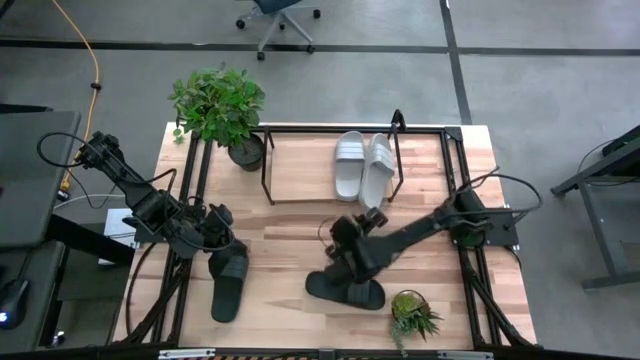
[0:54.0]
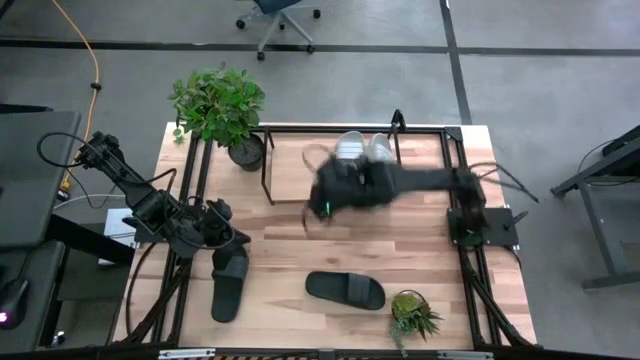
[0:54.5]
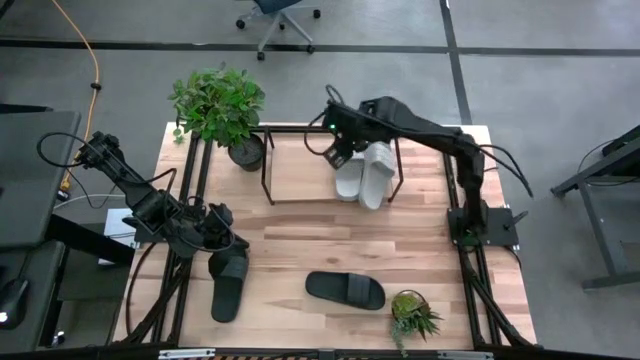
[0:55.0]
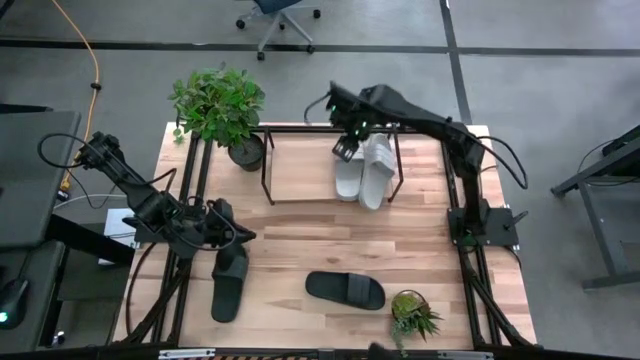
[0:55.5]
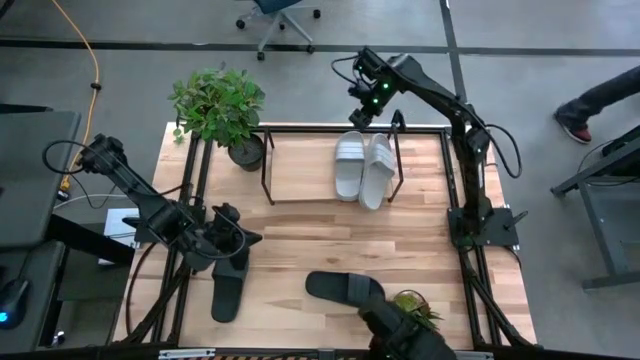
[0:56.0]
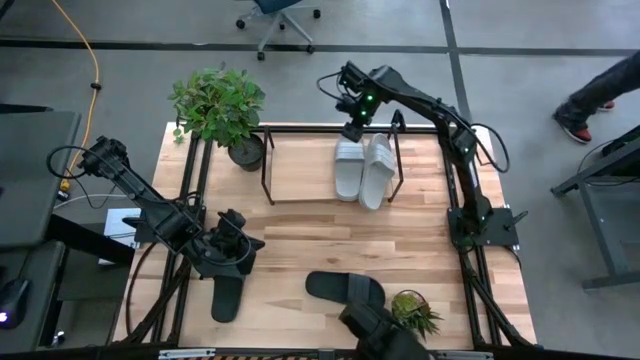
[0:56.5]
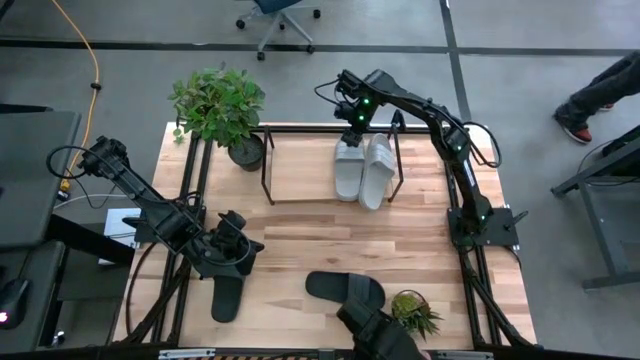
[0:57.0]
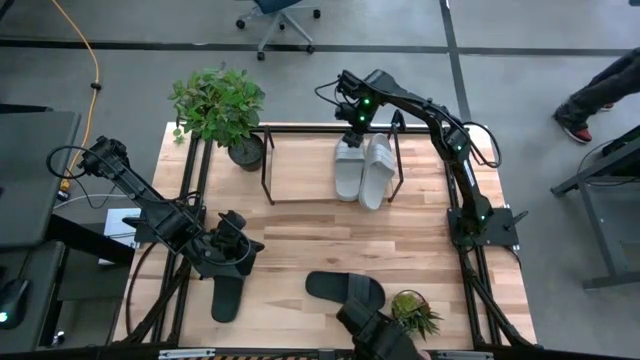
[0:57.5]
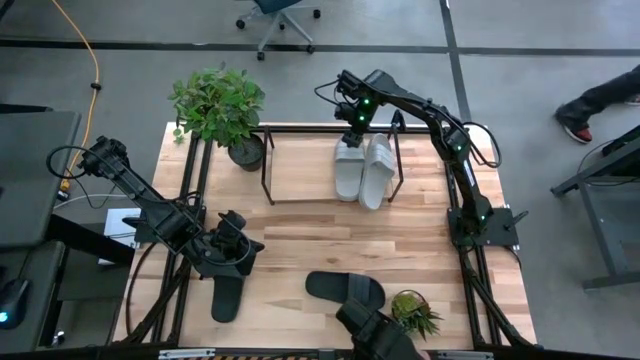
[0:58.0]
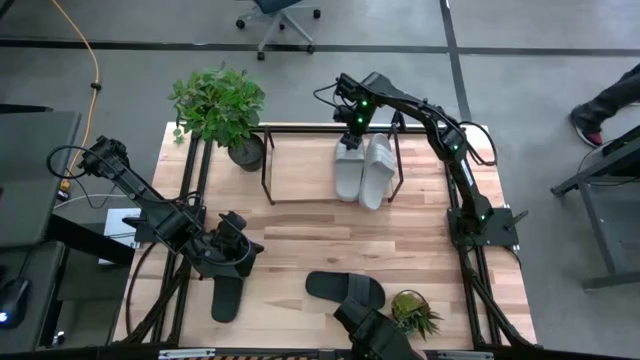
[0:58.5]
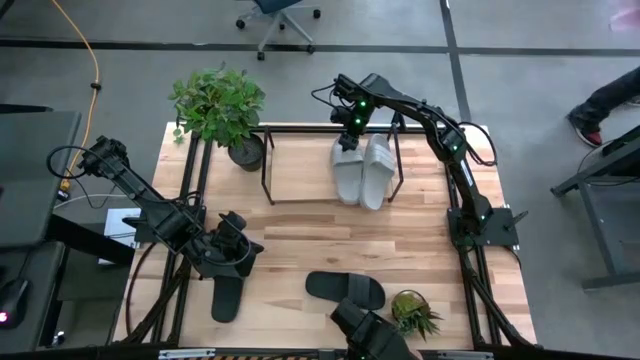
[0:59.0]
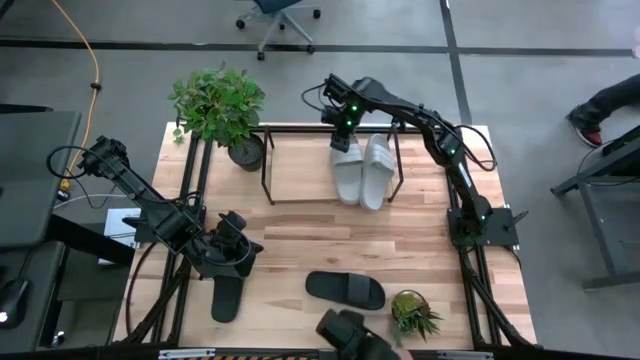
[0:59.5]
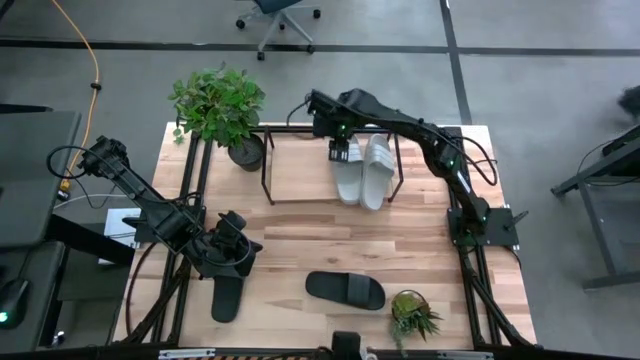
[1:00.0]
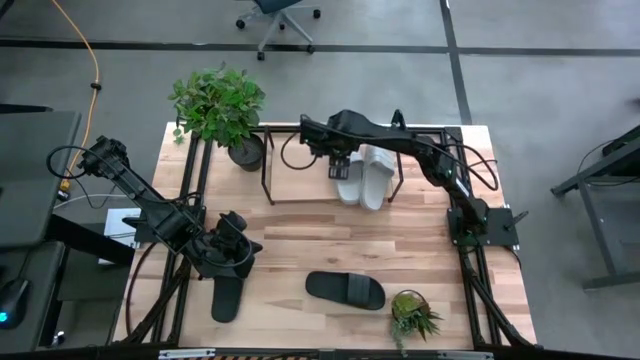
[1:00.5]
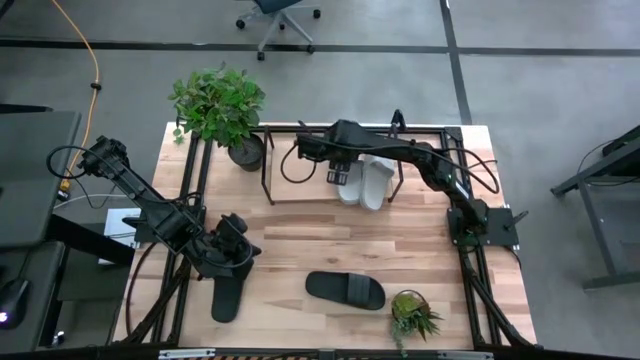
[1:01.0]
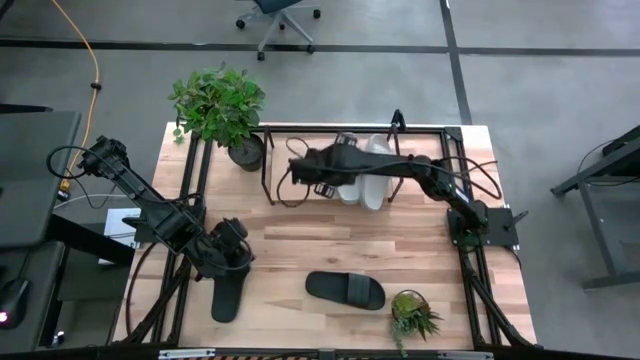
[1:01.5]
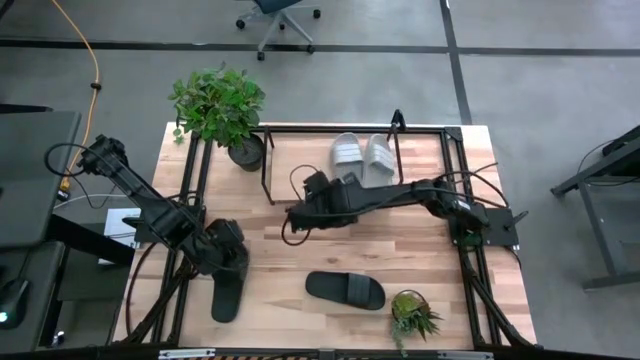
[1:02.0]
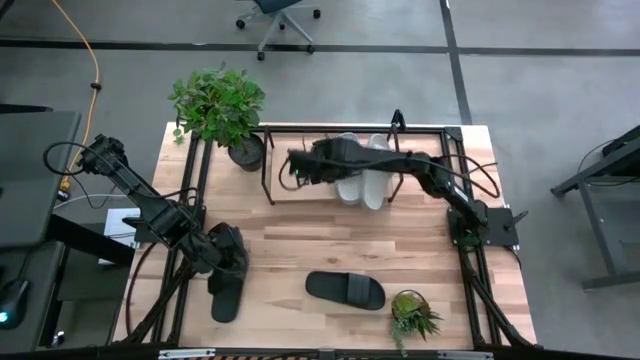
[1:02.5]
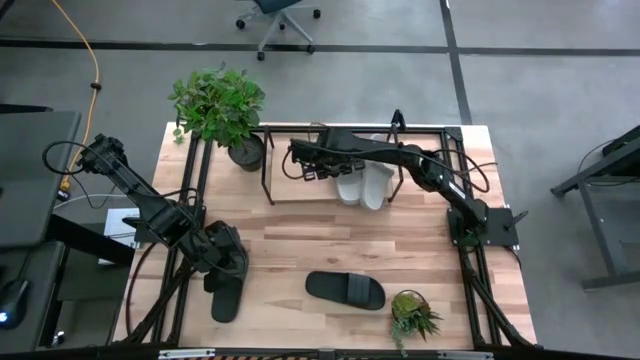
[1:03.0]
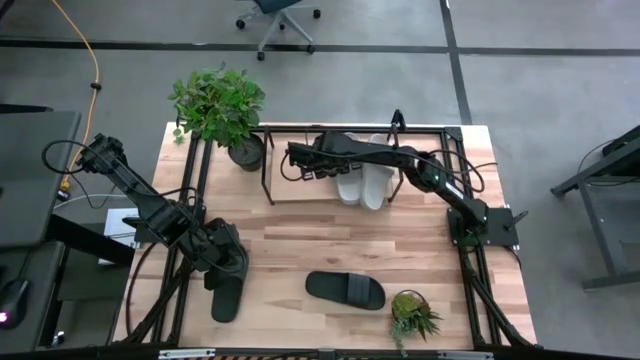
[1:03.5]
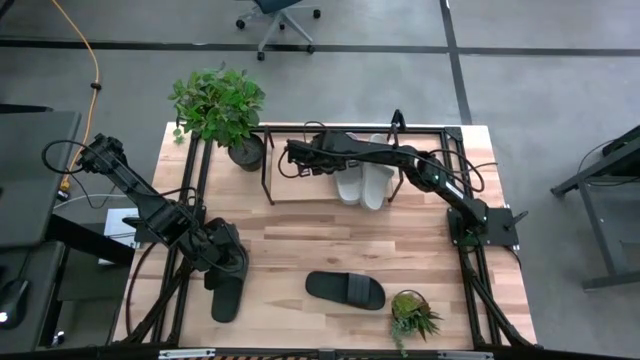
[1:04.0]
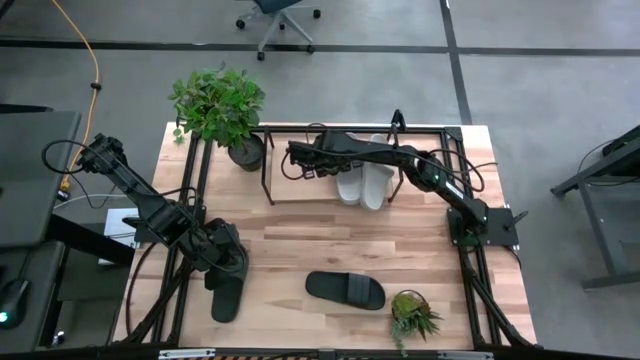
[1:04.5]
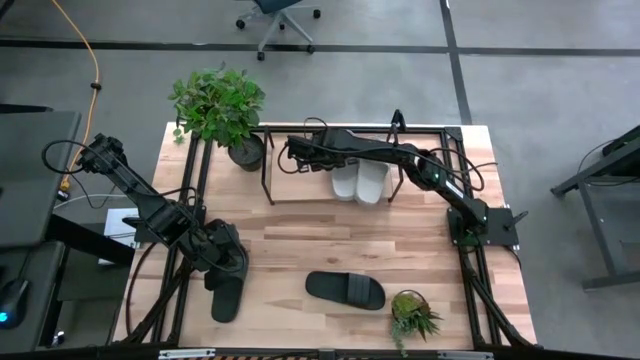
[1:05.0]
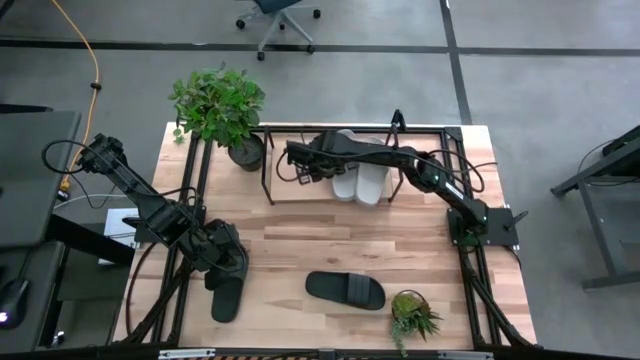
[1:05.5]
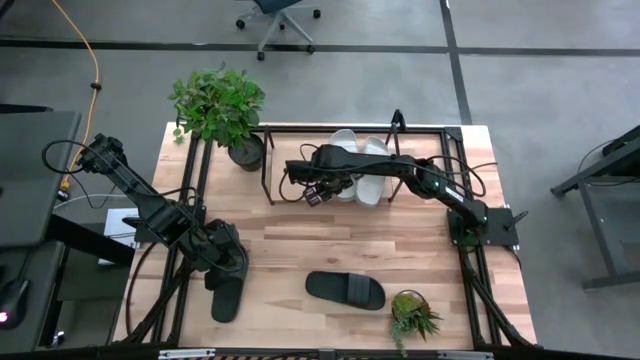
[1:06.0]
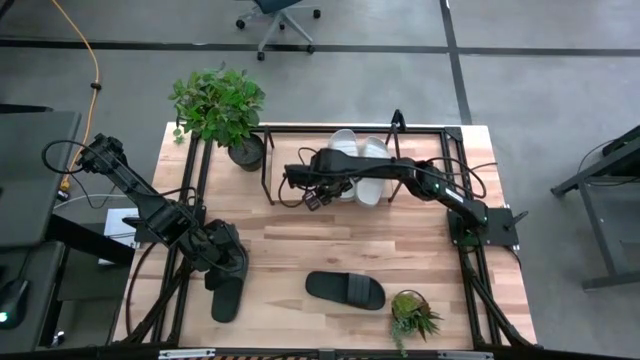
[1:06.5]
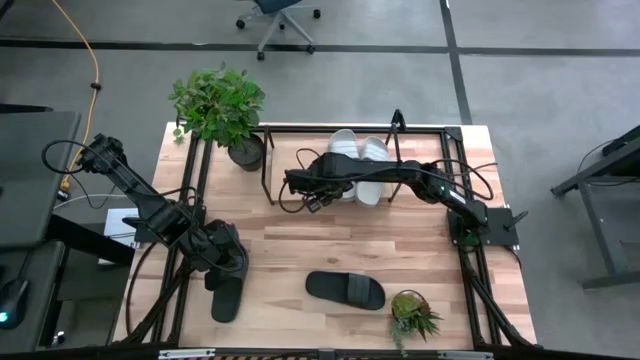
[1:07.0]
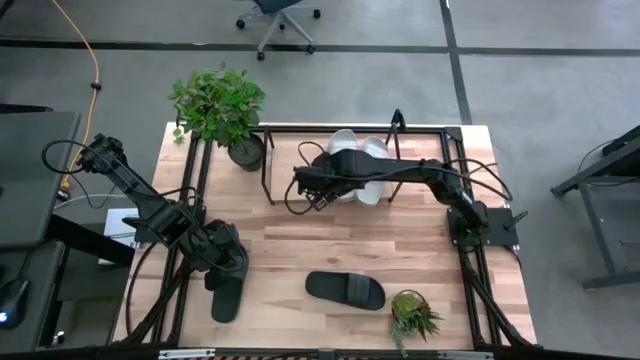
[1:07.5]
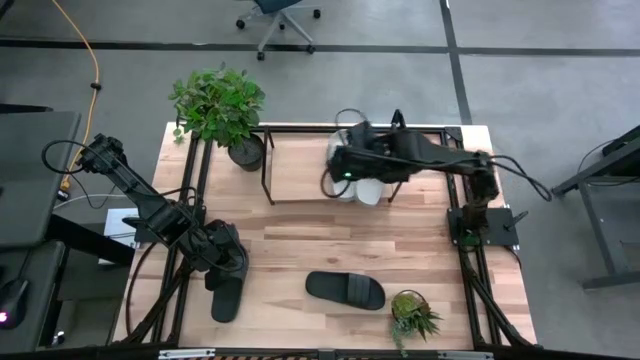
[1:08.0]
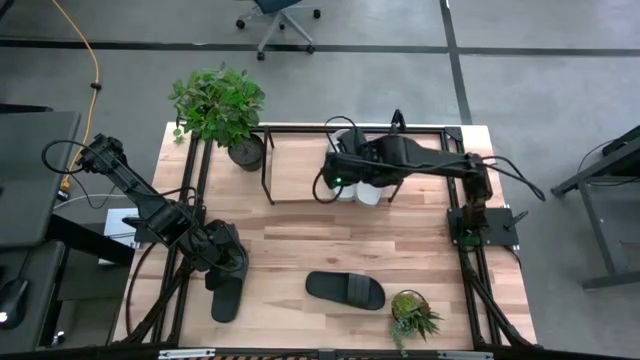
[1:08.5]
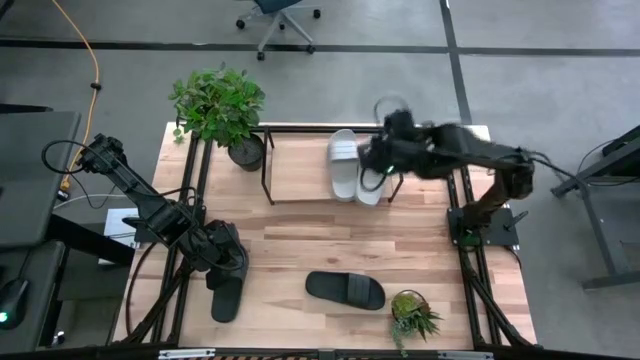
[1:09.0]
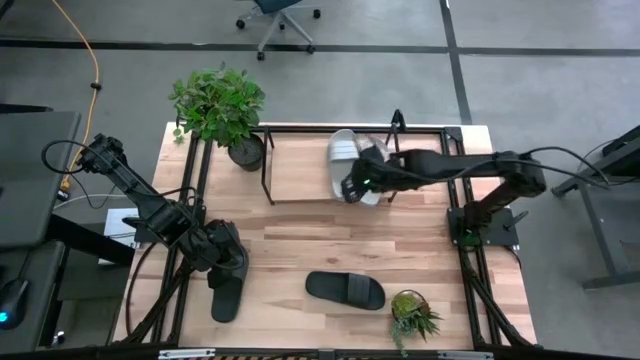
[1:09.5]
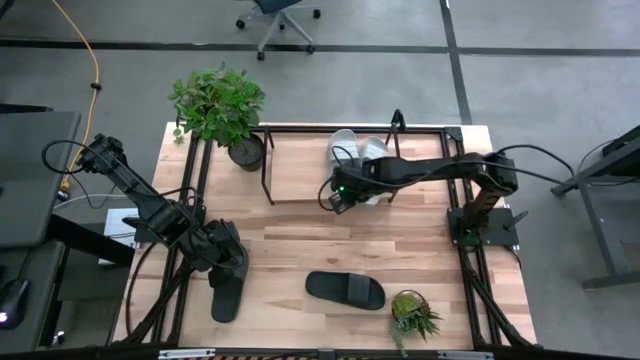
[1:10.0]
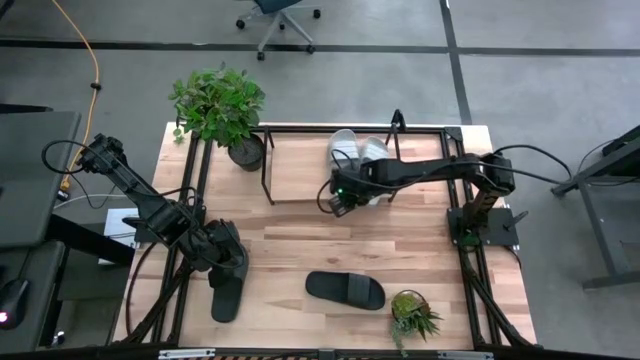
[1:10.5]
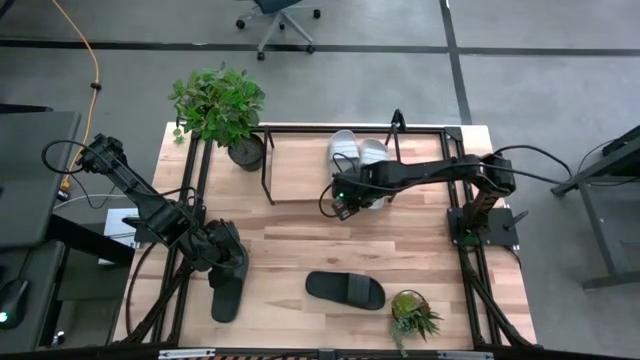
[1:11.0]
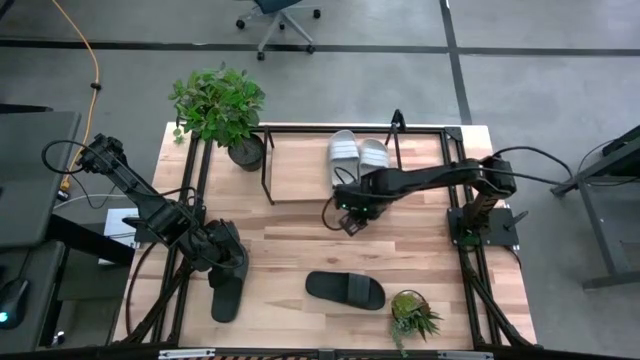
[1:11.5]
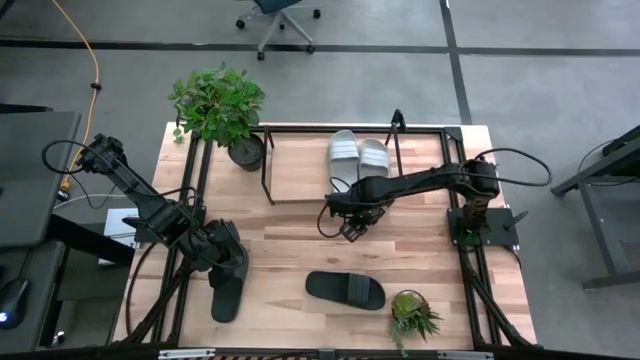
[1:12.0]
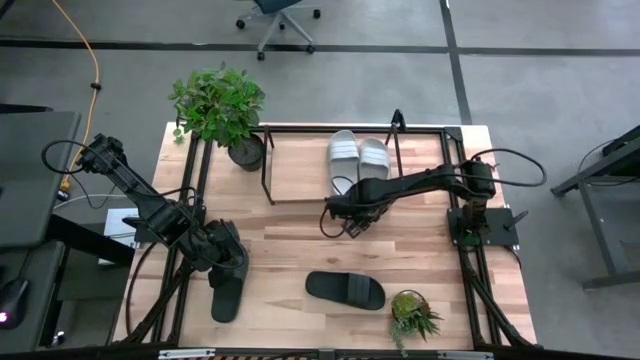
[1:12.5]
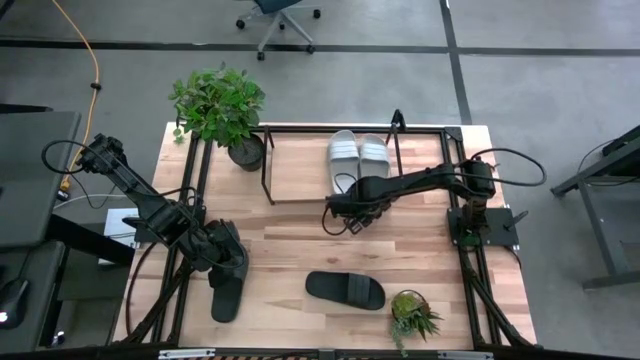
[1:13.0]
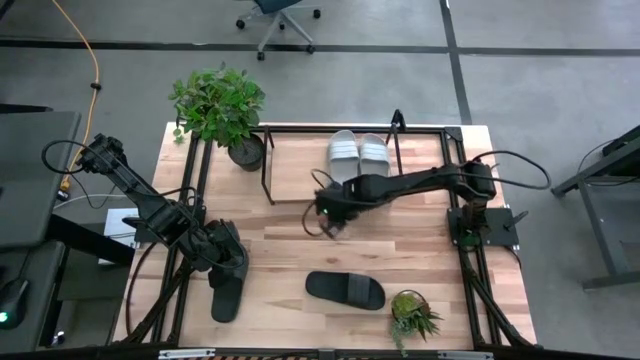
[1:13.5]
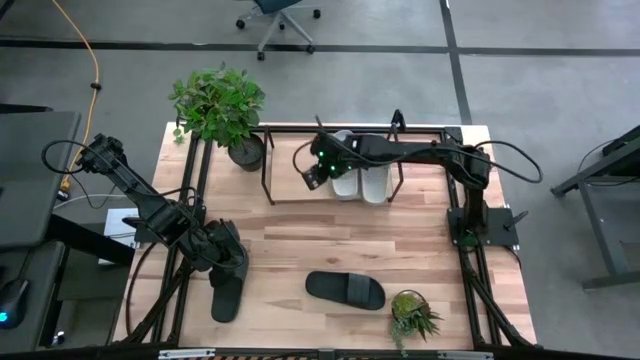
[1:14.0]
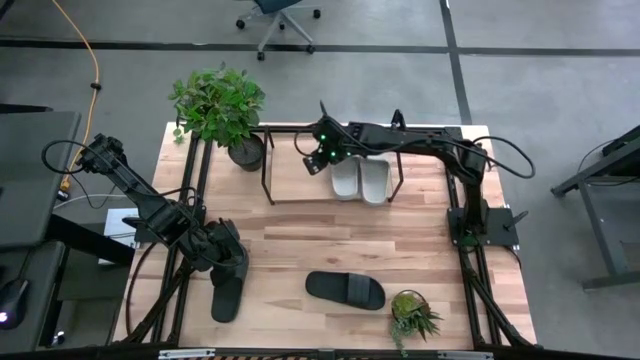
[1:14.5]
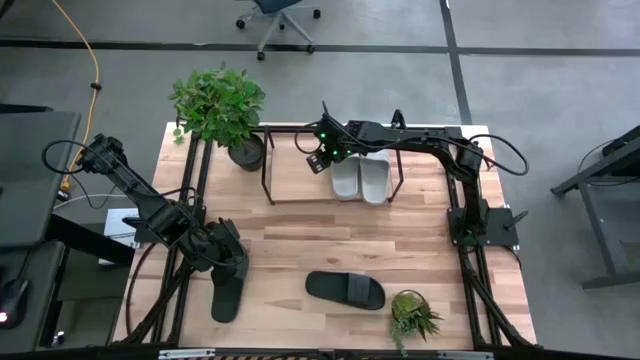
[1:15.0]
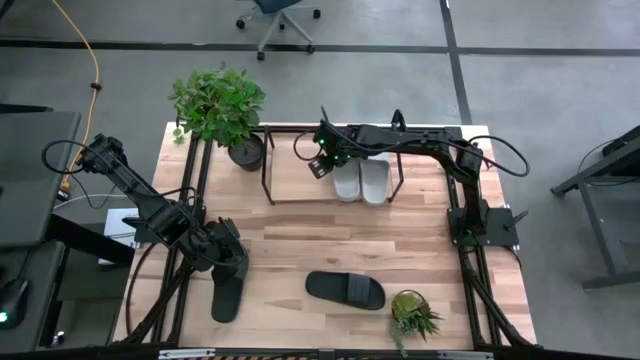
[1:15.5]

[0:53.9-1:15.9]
Task: Pick and place slides into the shelf
Adjust the slippers on the shelf
